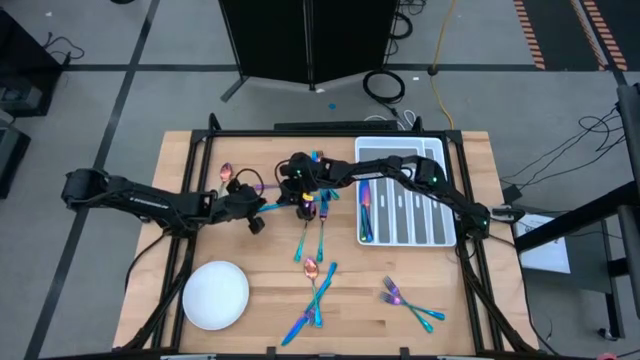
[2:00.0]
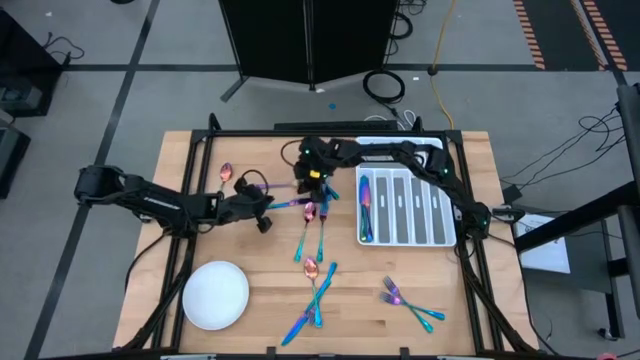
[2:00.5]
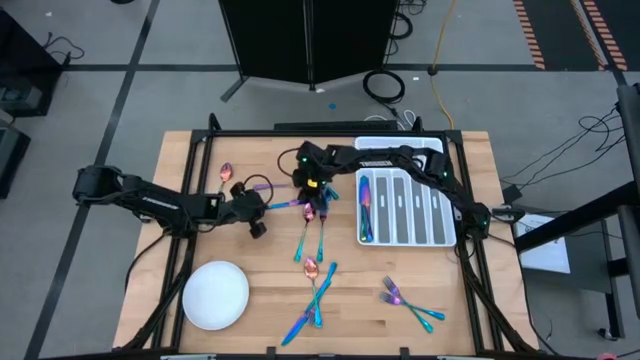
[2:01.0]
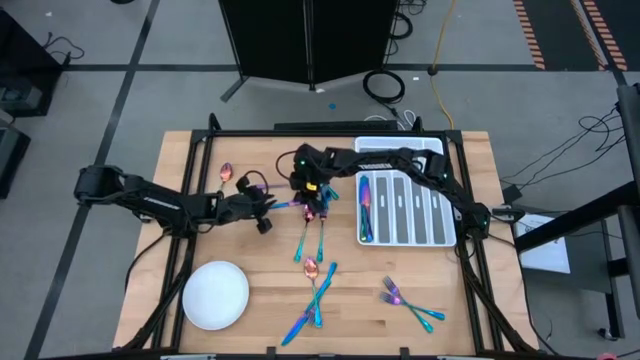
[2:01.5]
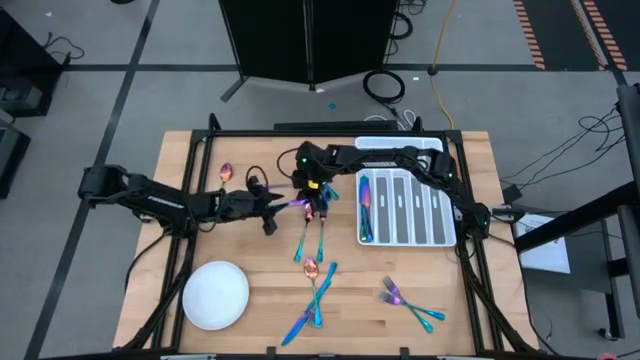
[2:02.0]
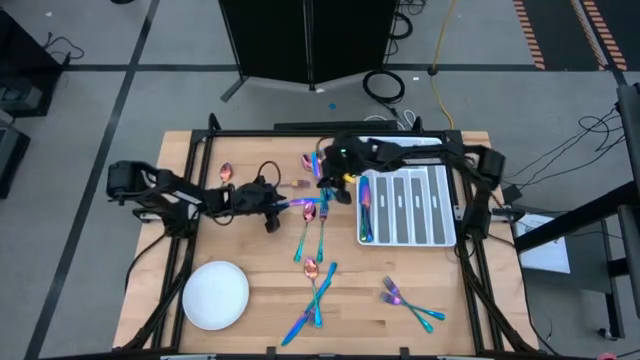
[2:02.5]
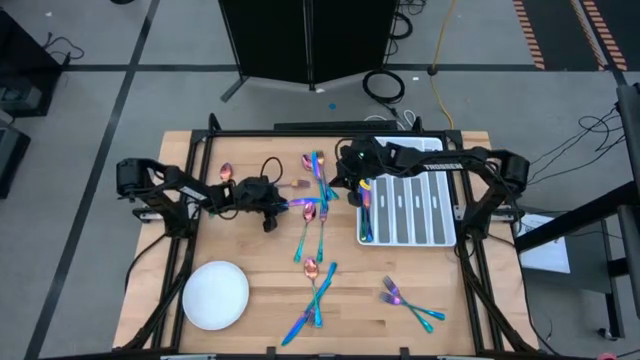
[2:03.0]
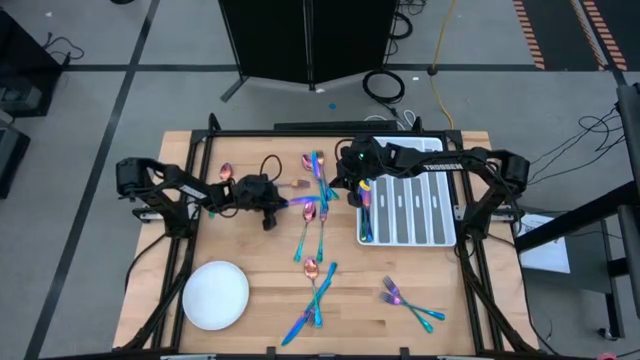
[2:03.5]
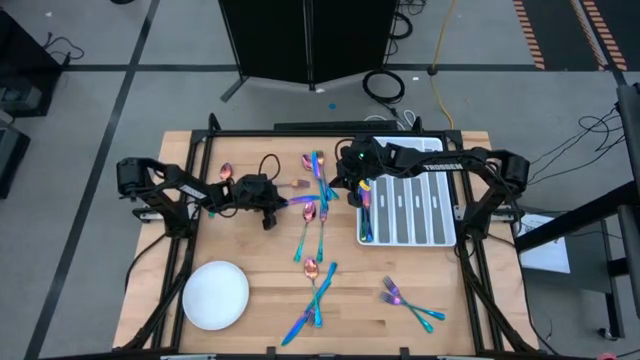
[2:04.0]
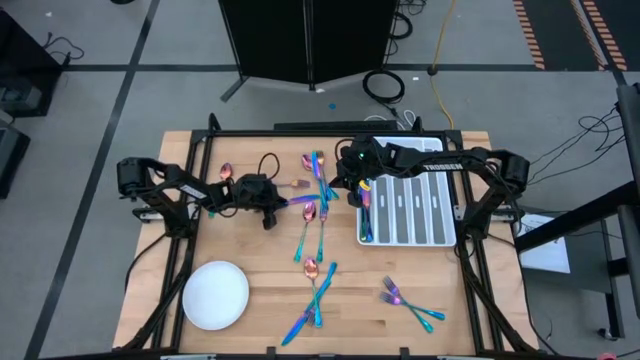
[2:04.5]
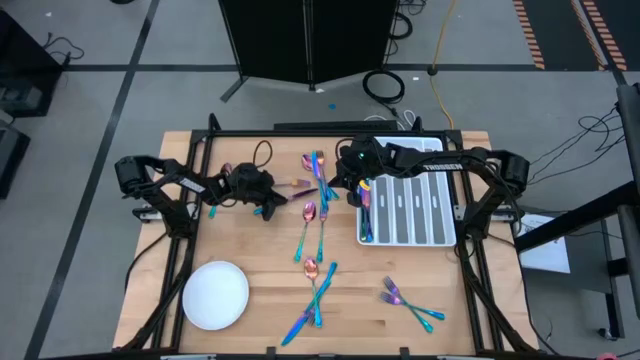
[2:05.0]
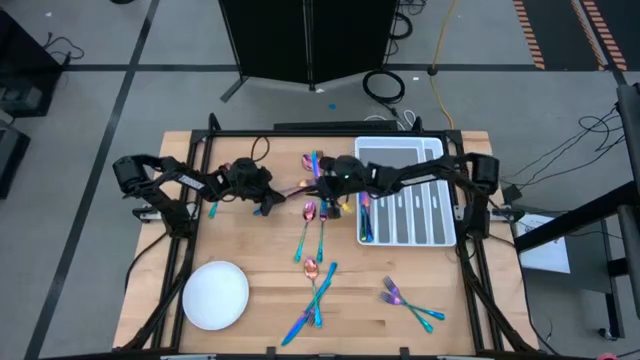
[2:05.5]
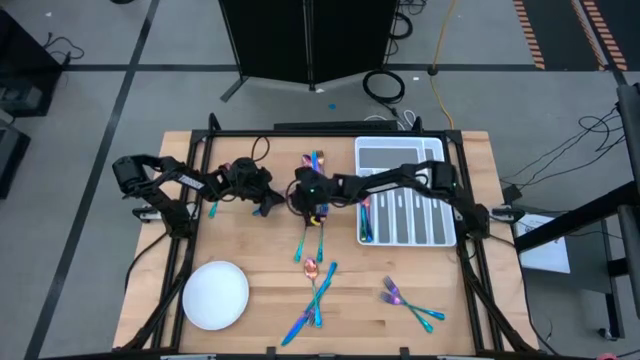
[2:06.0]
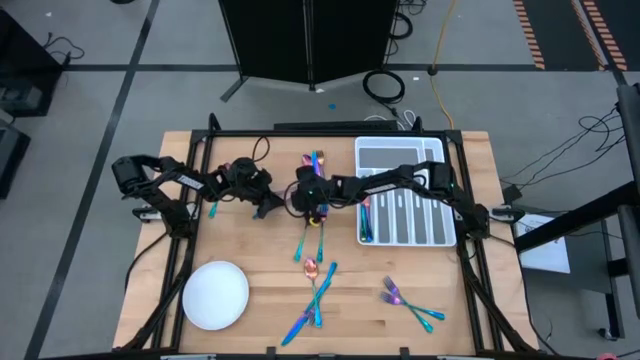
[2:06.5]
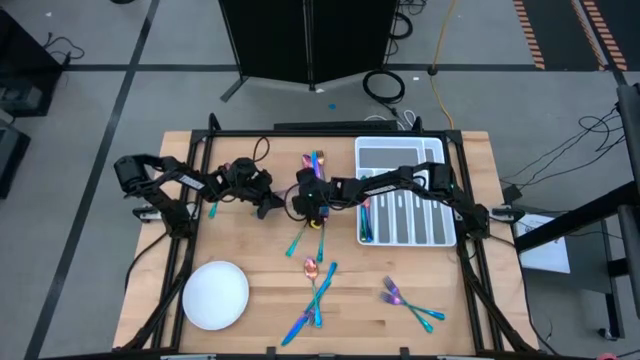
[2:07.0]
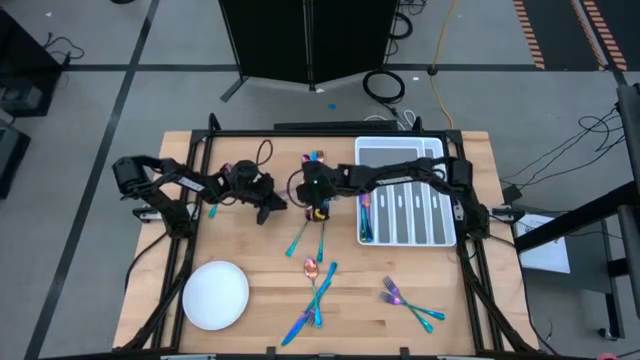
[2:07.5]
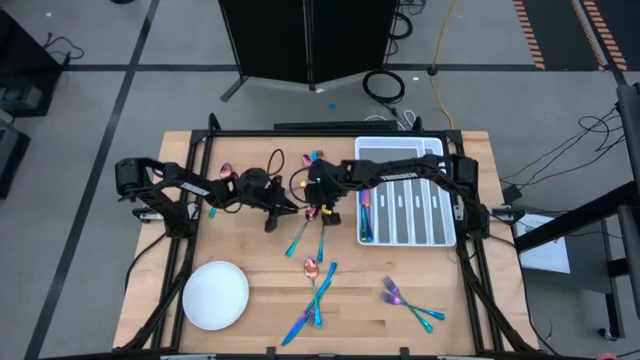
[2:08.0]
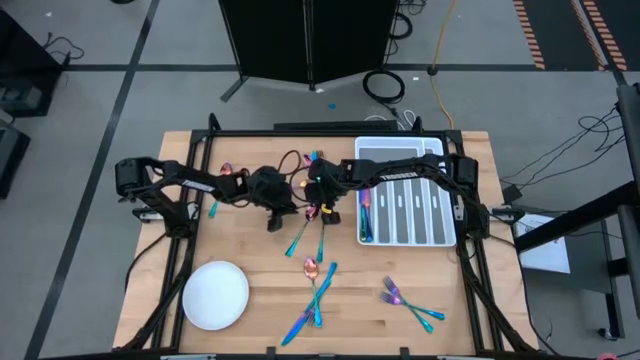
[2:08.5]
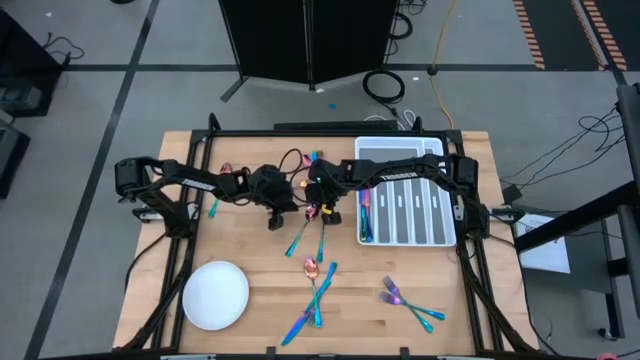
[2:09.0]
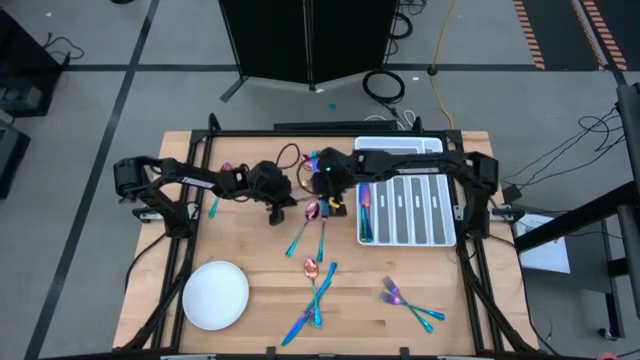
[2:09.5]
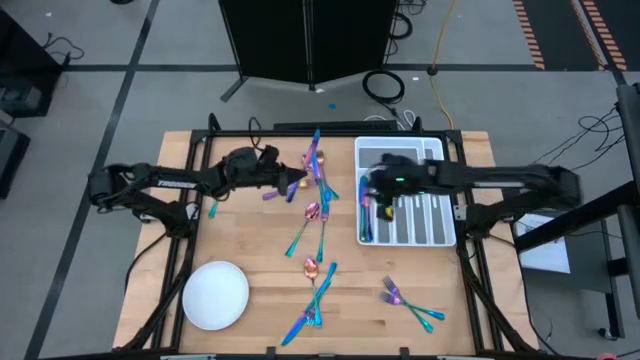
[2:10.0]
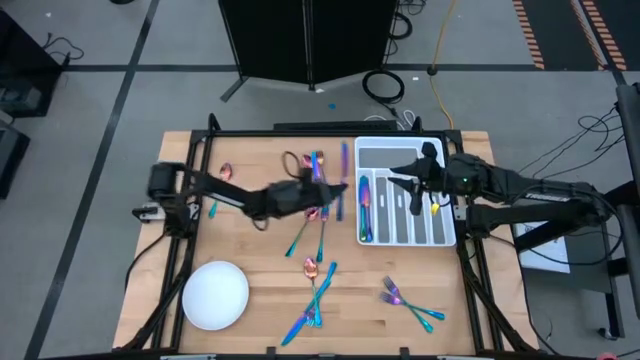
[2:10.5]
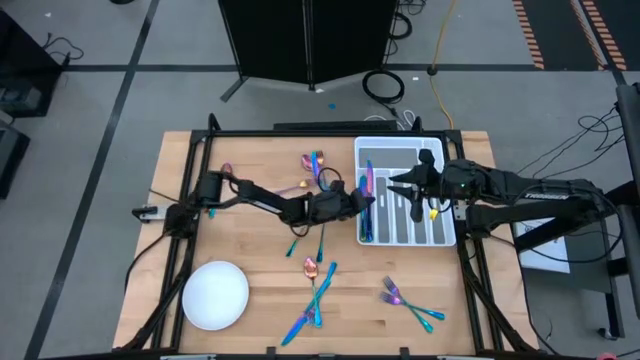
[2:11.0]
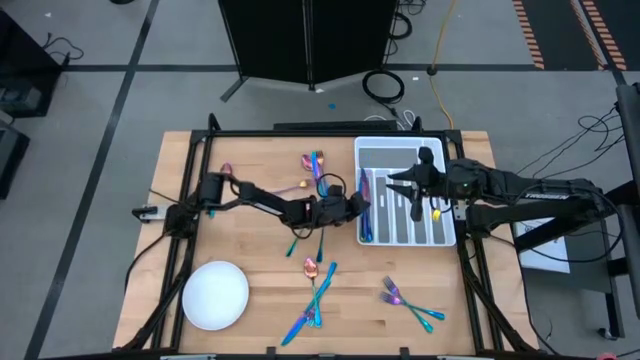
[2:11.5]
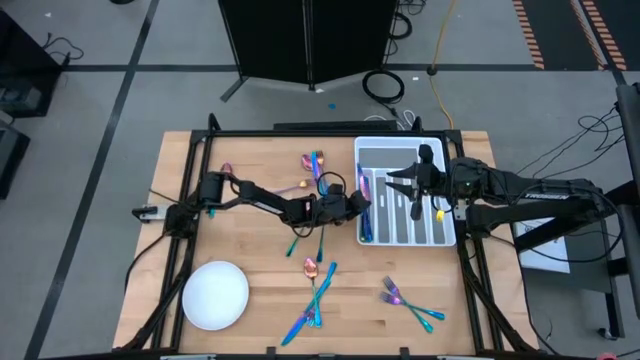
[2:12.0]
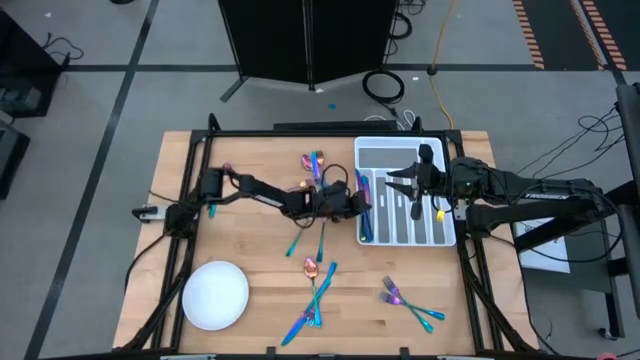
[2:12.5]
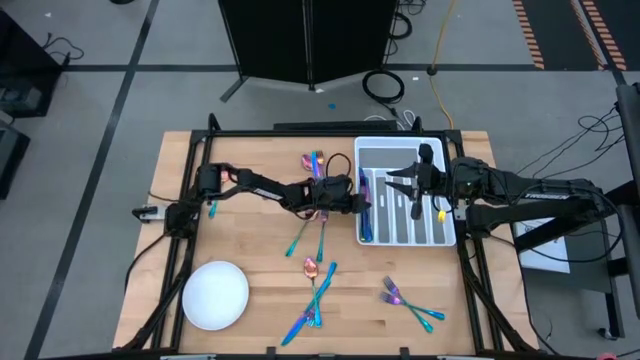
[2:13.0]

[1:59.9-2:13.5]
Task: Sort silverware
Put the blue knife into the utensil organizer

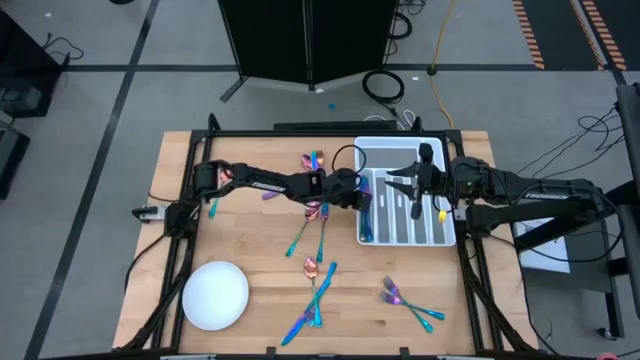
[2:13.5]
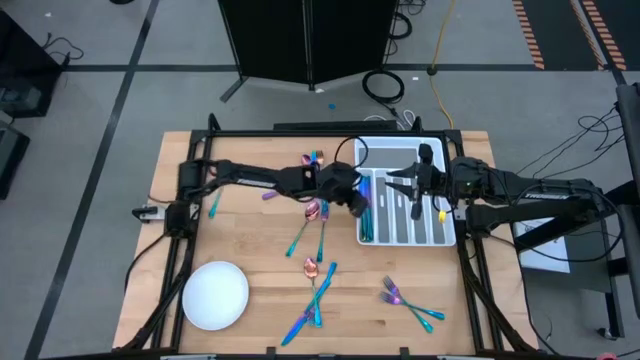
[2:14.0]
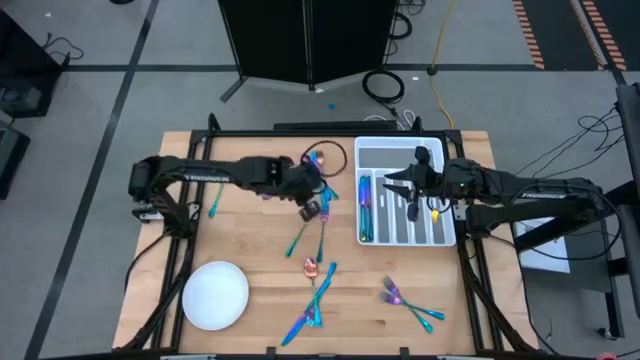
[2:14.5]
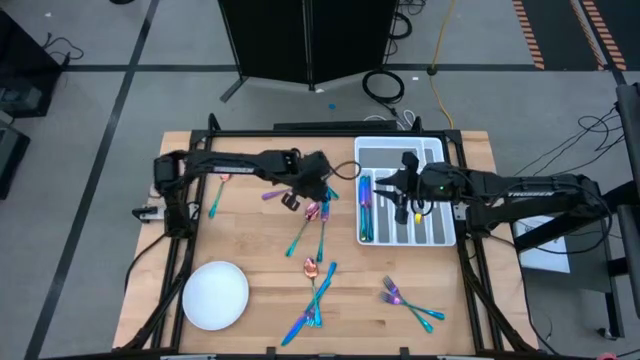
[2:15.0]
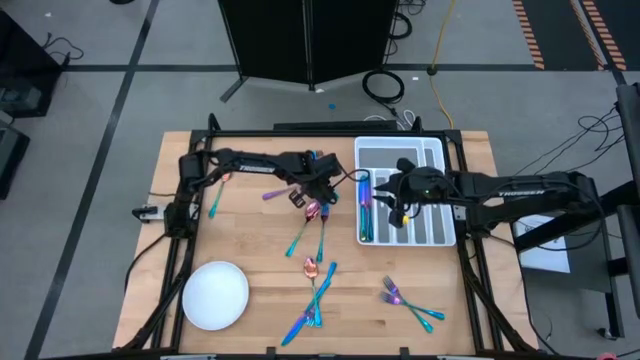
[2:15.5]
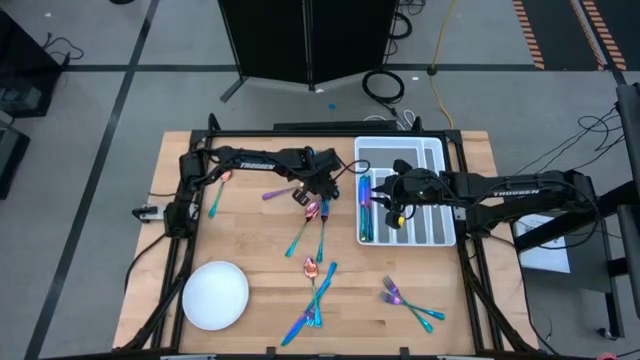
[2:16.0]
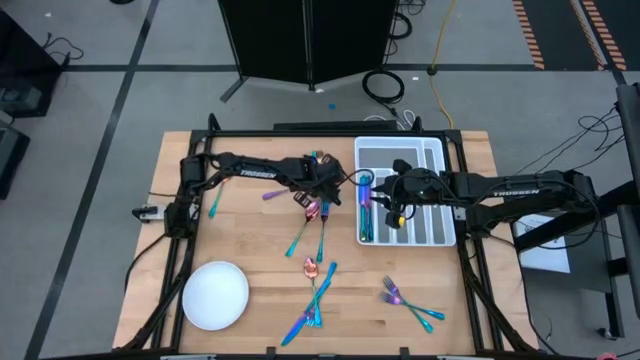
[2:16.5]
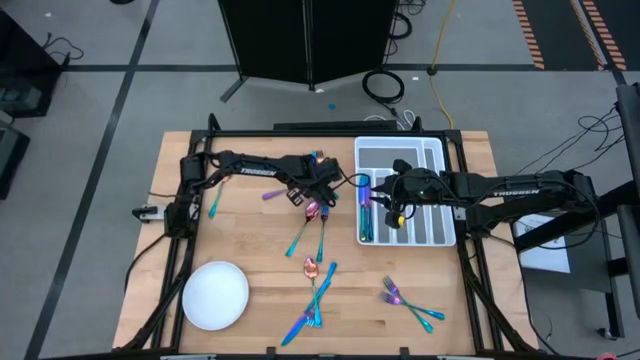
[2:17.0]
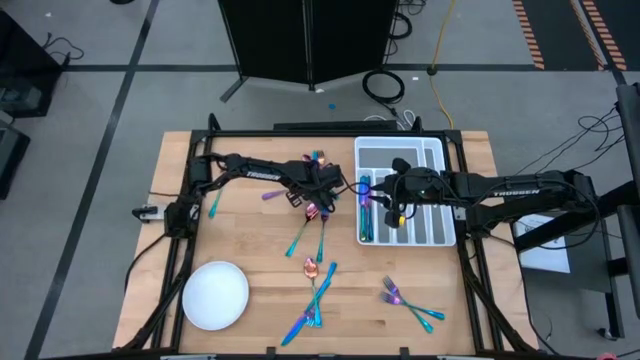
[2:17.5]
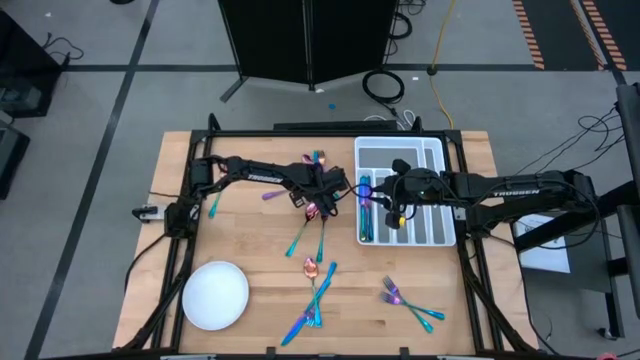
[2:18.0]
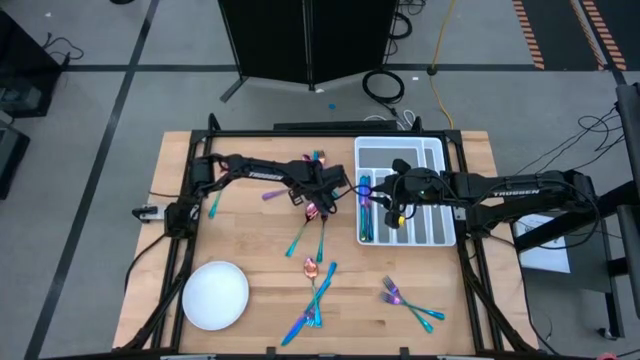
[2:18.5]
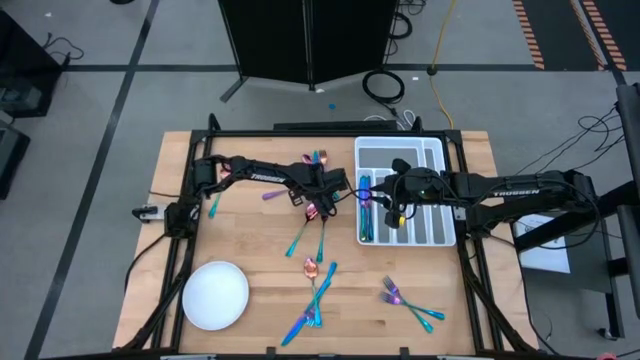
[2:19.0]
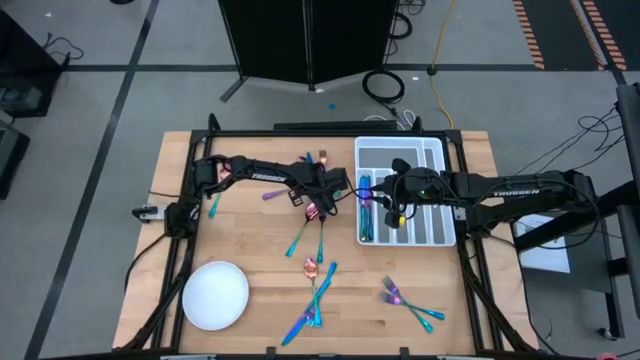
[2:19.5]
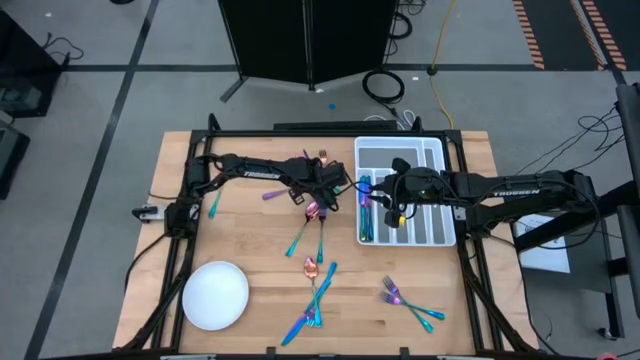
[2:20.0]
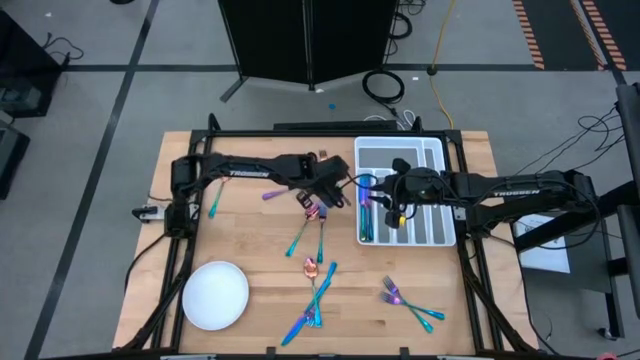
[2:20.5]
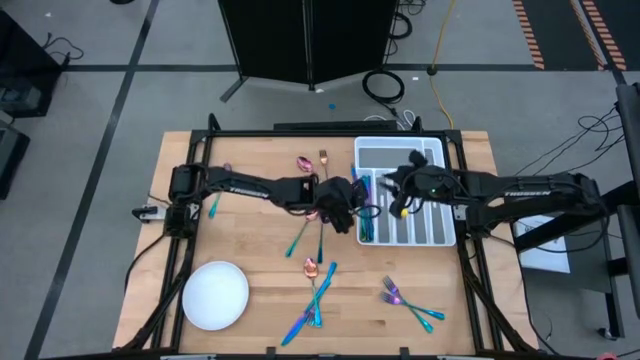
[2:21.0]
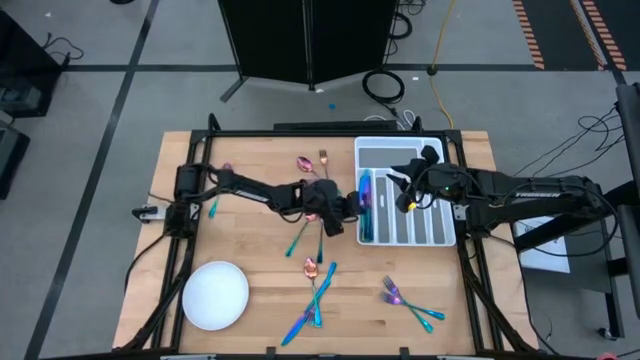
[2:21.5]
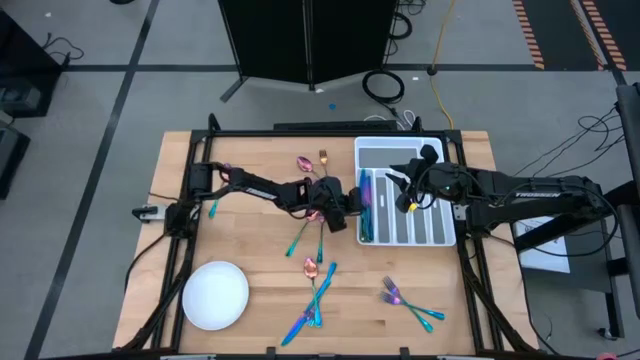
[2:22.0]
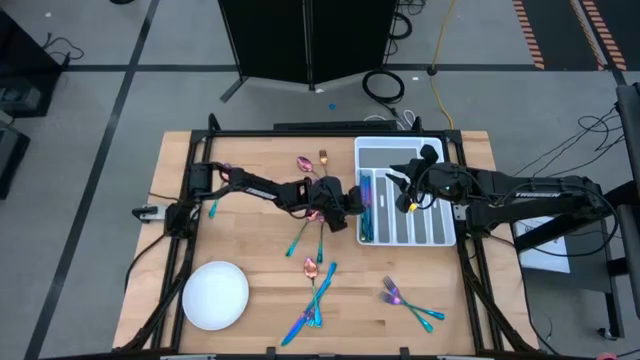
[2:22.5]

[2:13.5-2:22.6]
Put the blue knife into the utensil organizer
